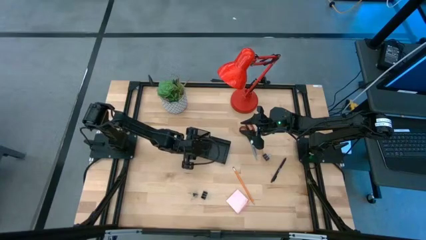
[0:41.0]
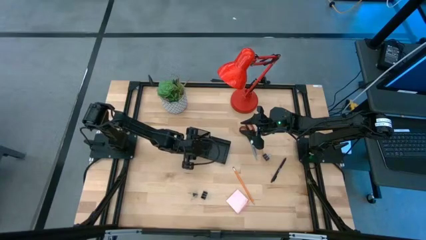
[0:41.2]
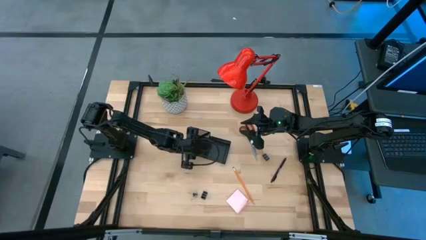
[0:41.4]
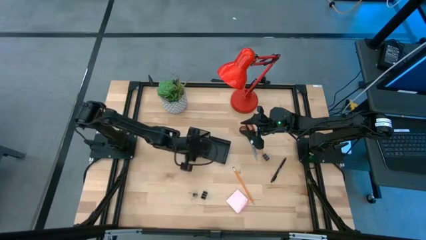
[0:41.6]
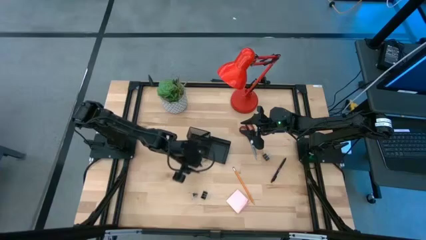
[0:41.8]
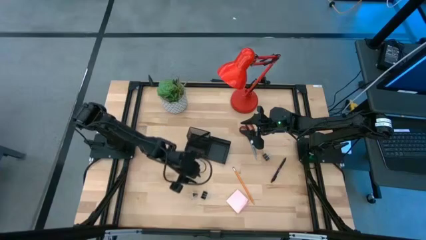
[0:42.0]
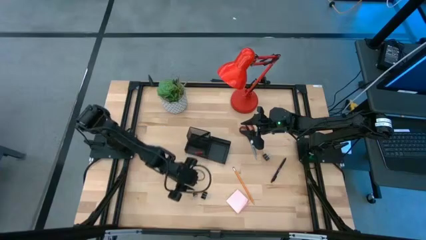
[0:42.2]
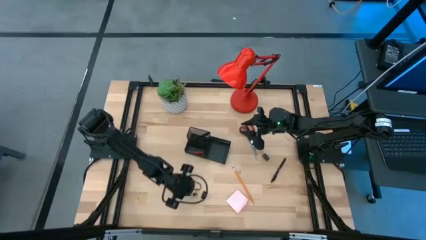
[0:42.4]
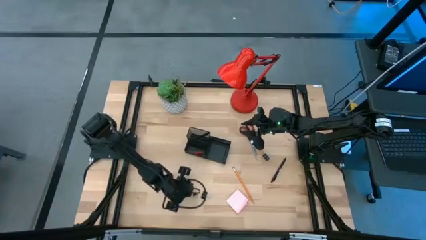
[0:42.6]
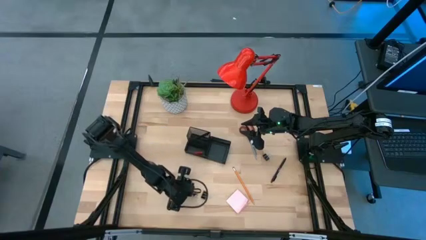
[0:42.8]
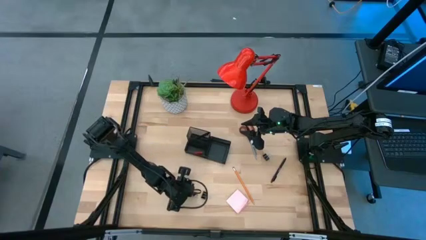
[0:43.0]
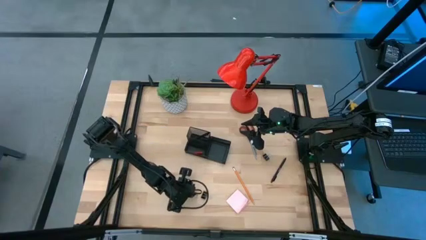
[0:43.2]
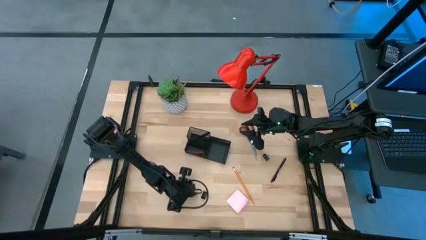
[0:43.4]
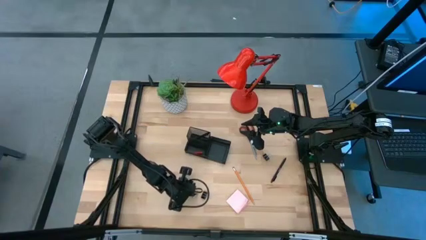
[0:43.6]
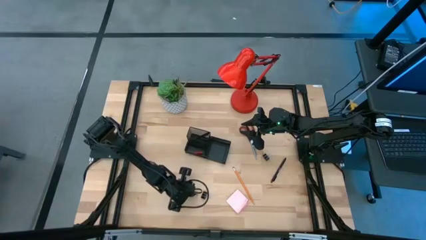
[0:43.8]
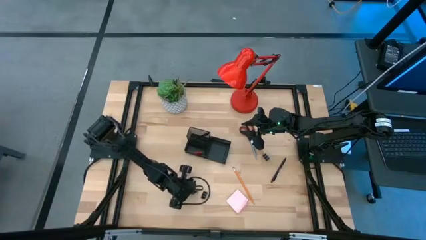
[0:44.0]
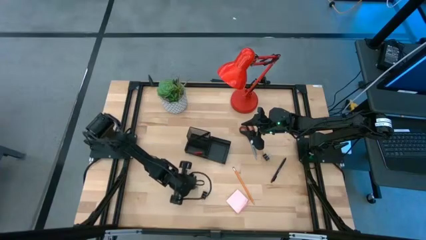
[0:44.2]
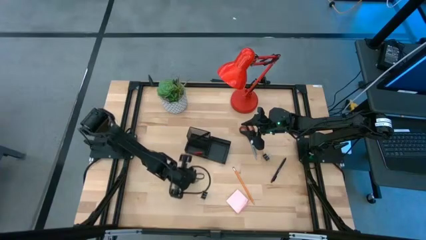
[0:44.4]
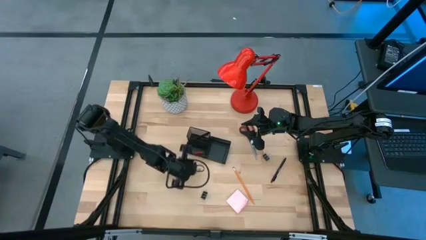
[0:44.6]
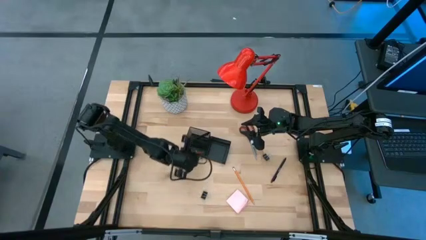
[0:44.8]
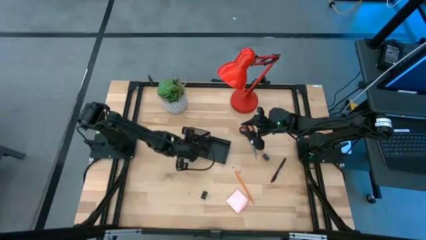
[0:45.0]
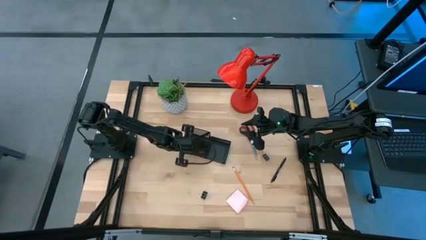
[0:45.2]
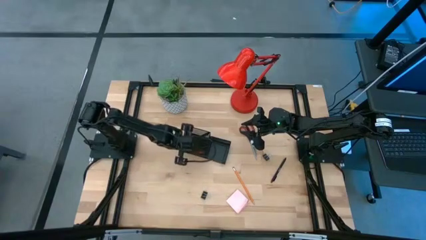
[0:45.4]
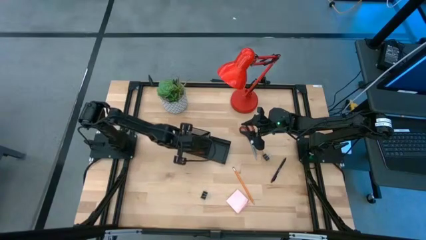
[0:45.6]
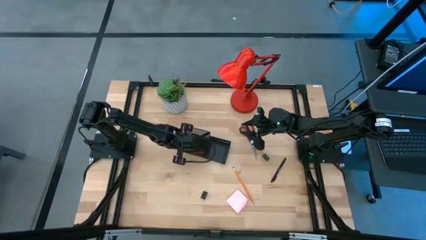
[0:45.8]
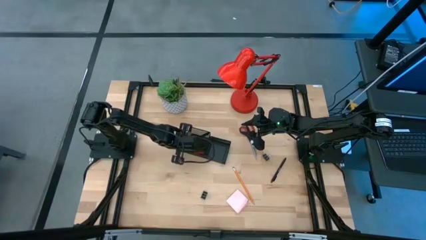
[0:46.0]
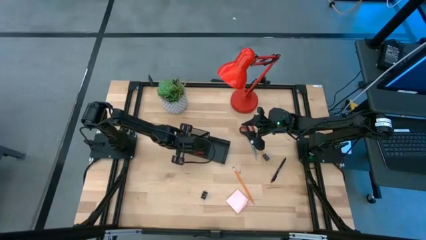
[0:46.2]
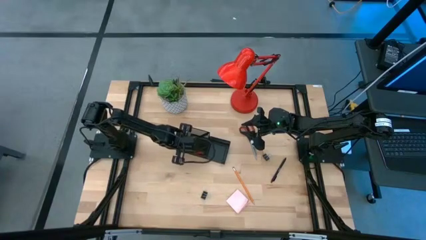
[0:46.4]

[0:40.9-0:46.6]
Task: Pick and place office supplies into organizer
Put the bottom left black binder clip into the black desk organizer

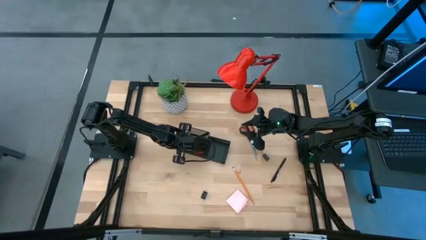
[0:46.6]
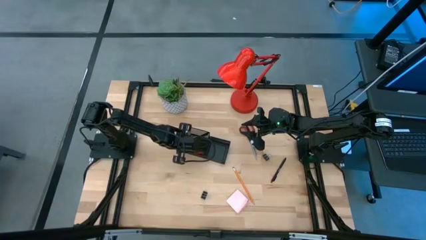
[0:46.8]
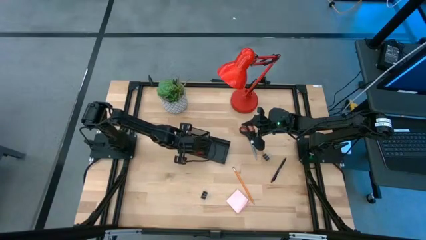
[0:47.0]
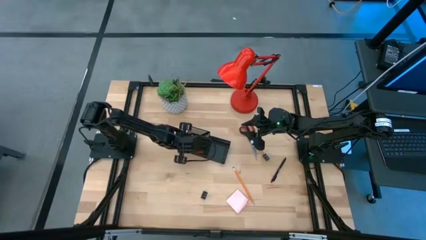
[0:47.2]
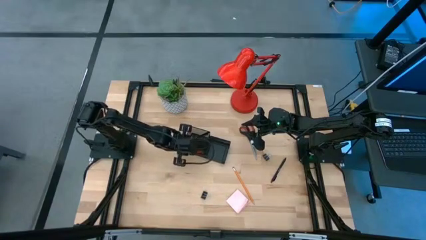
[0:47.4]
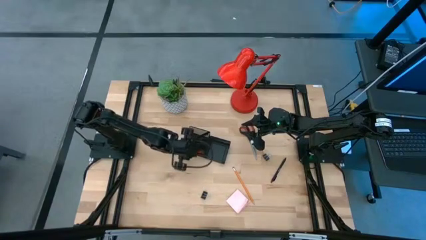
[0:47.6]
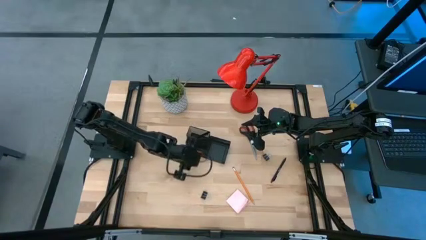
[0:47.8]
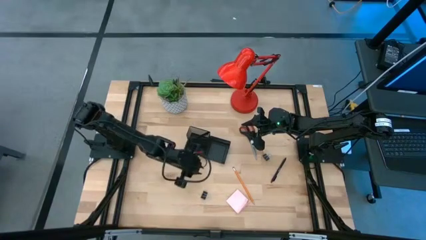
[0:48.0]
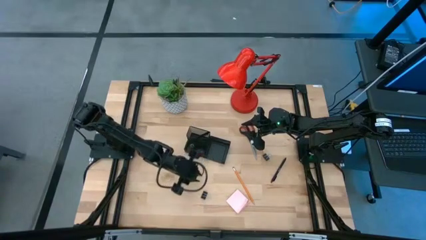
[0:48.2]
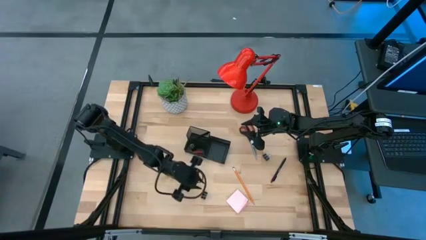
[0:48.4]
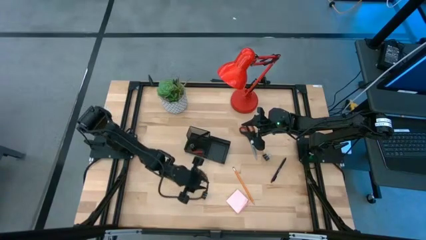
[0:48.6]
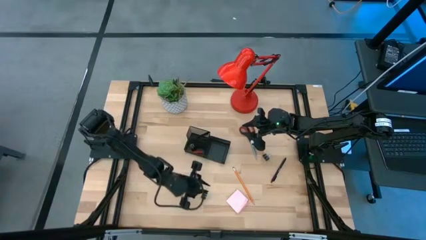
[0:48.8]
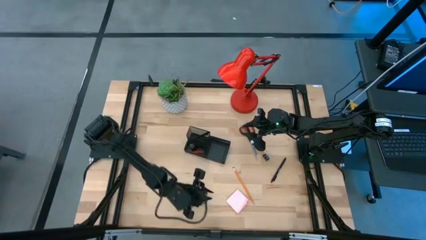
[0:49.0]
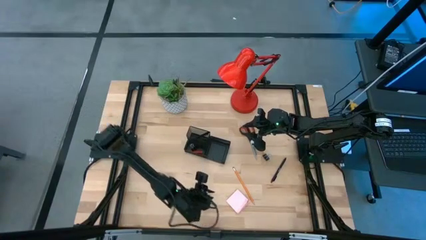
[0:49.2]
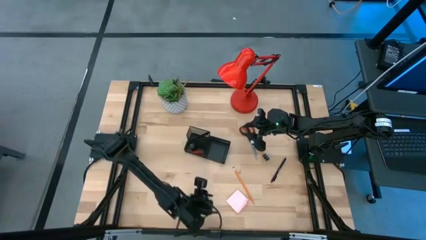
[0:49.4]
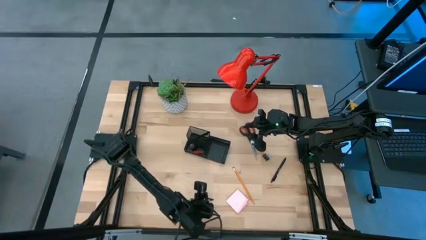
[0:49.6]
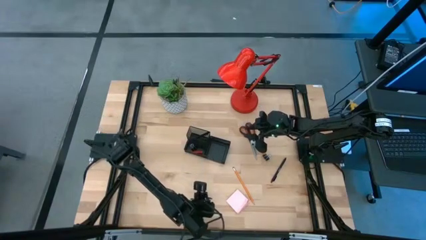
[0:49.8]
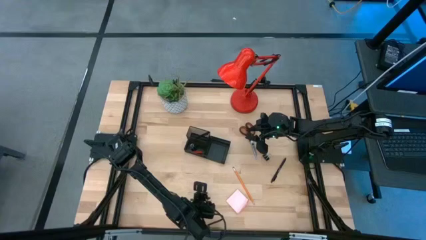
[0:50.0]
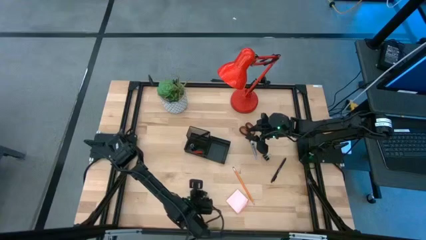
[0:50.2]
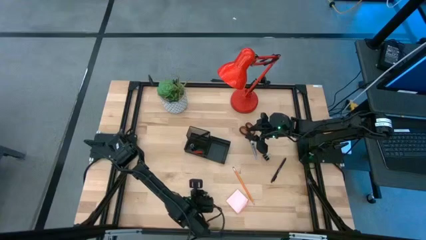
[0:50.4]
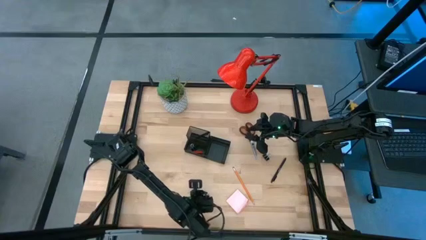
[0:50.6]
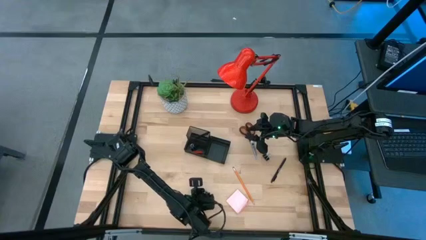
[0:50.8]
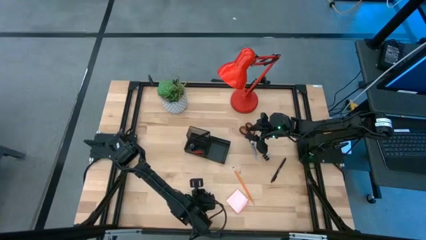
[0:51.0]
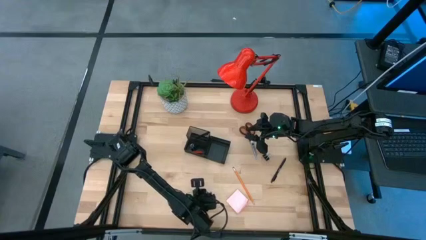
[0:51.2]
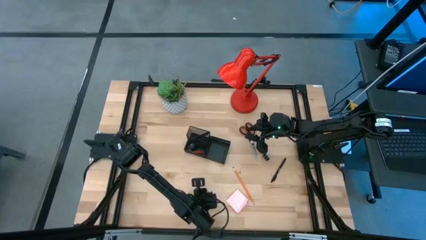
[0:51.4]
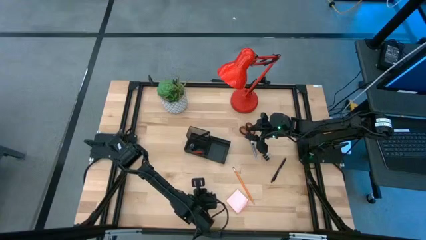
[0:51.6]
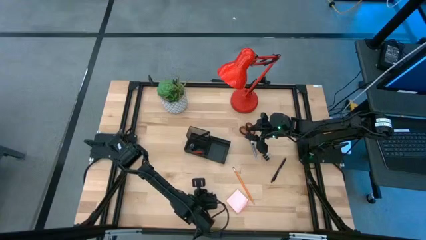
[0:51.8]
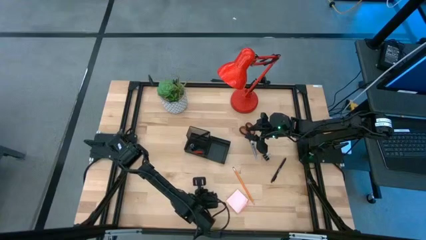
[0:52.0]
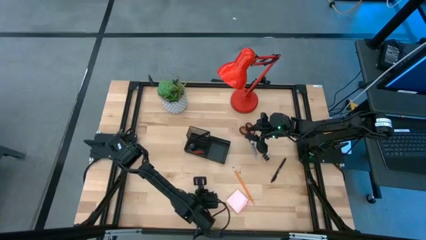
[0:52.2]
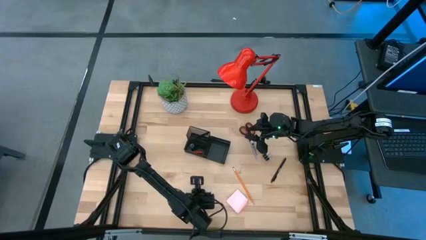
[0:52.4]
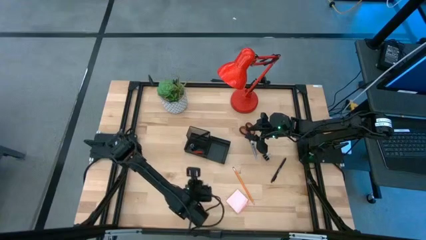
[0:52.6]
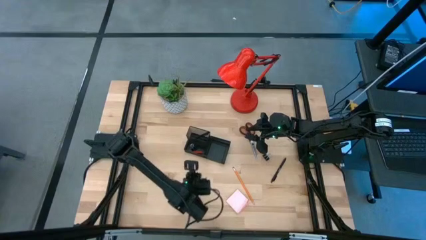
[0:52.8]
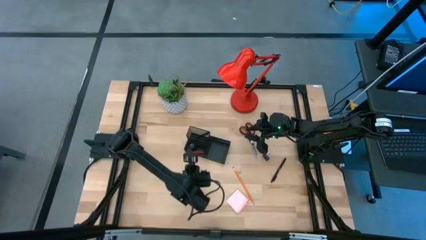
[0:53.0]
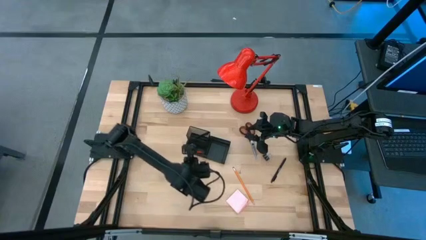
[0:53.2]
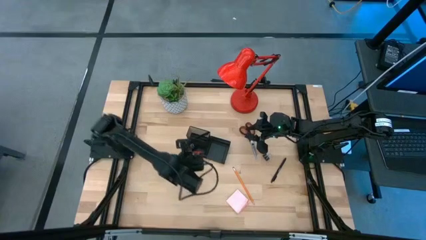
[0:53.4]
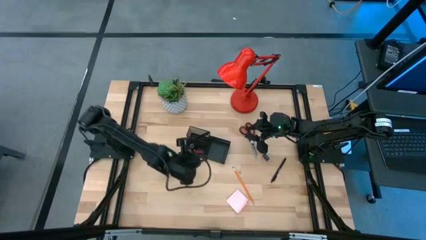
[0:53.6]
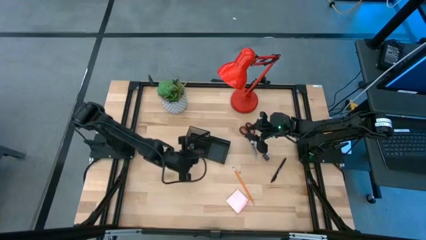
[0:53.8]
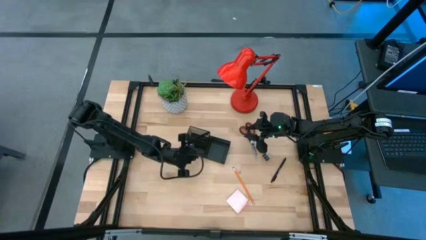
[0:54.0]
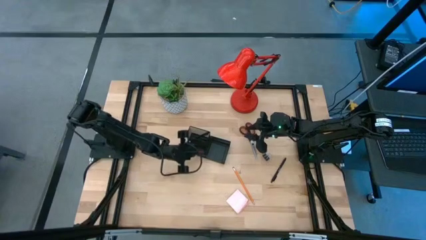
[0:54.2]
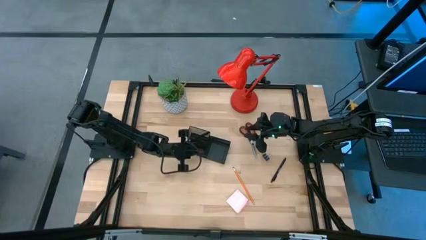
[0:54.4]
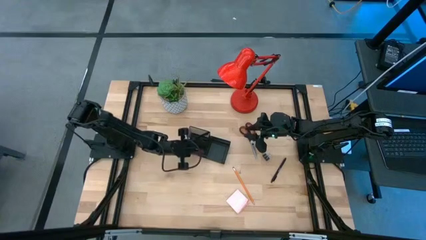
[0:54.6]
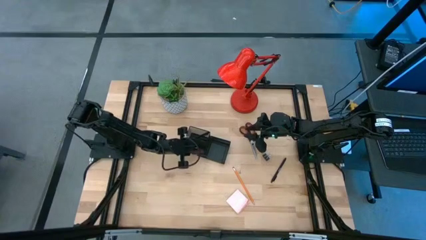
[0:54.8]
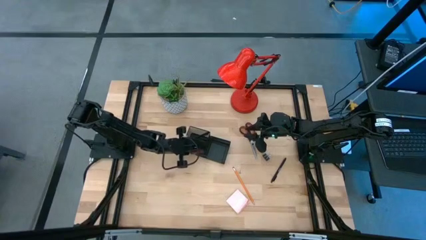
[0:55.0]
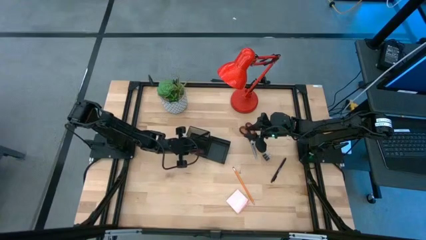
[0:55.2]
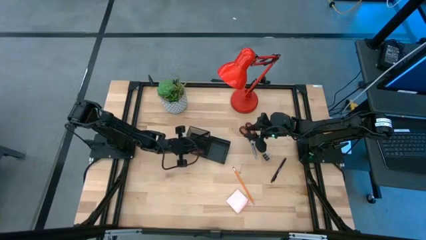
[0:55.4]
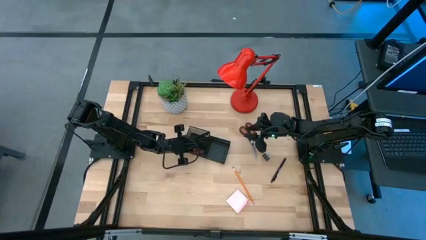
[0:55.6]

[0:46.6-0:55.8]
Put the bottom black binder clip into the black desk organizer
